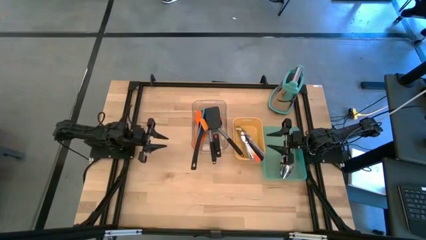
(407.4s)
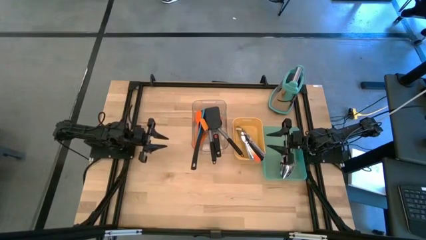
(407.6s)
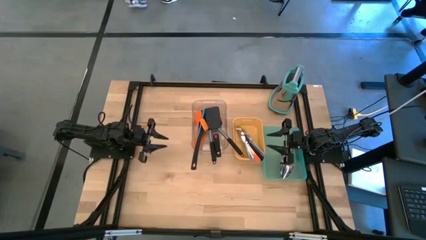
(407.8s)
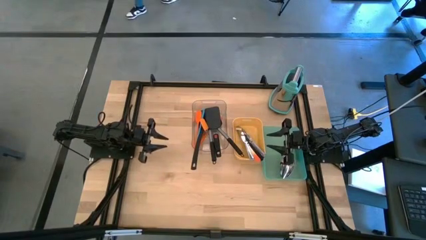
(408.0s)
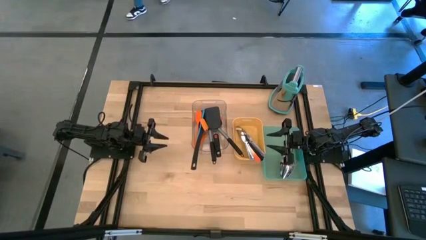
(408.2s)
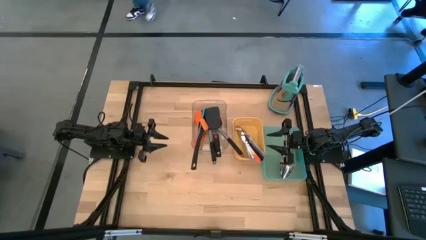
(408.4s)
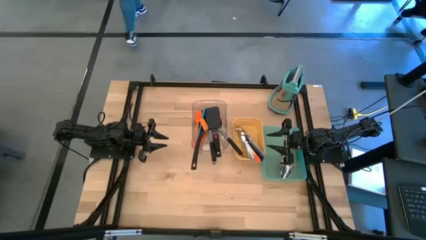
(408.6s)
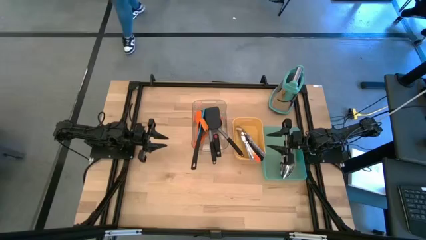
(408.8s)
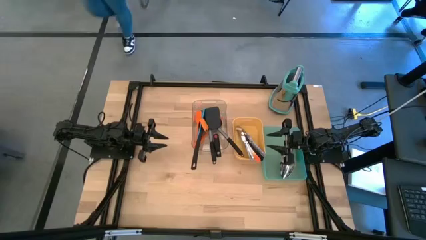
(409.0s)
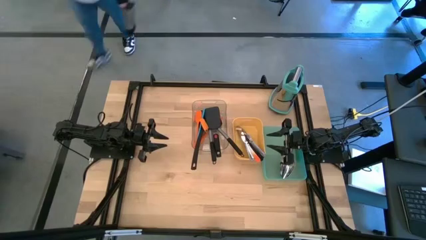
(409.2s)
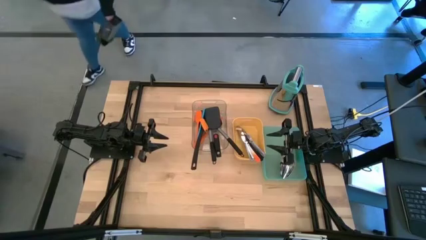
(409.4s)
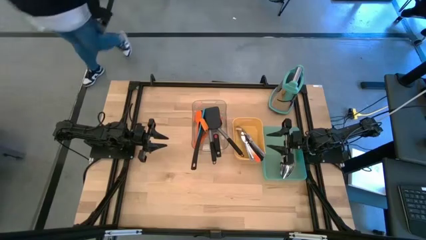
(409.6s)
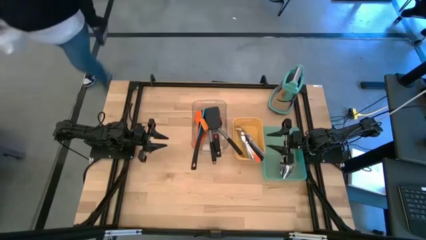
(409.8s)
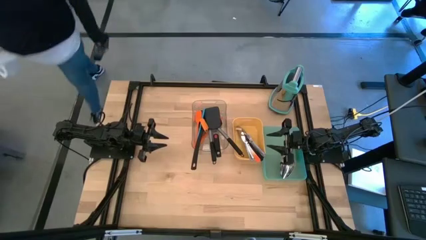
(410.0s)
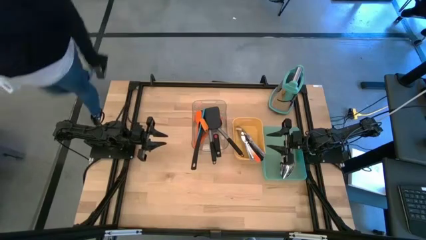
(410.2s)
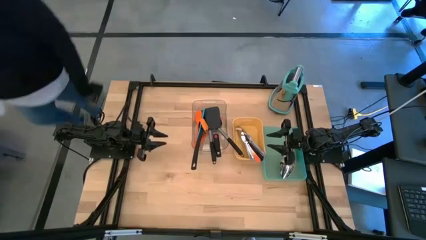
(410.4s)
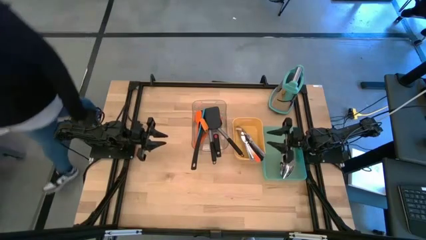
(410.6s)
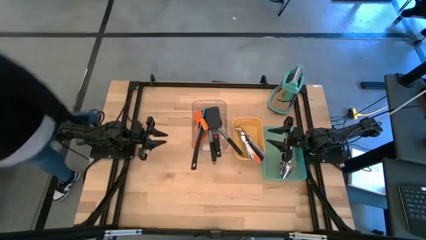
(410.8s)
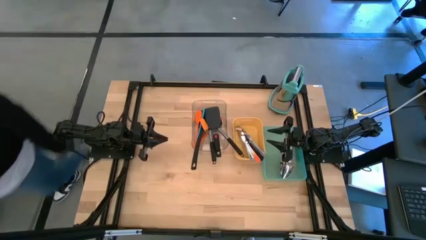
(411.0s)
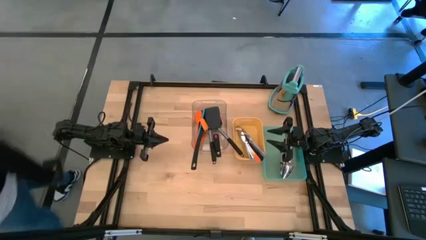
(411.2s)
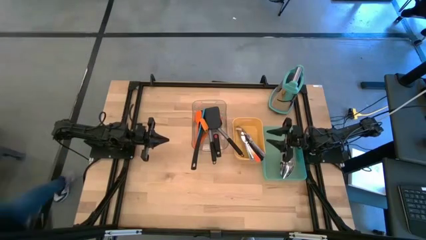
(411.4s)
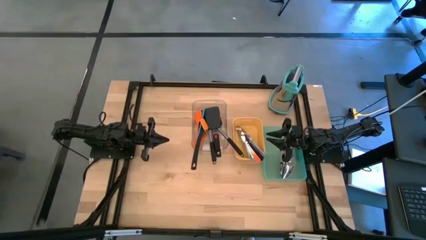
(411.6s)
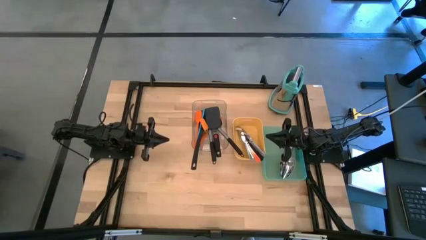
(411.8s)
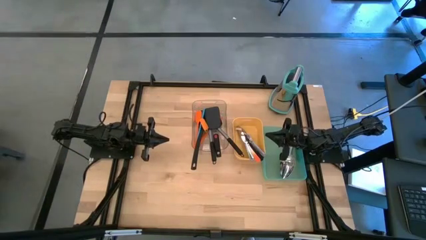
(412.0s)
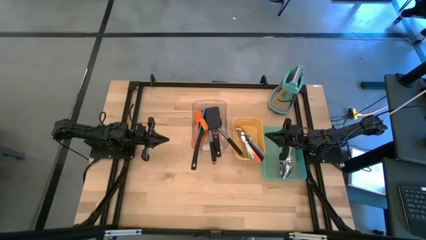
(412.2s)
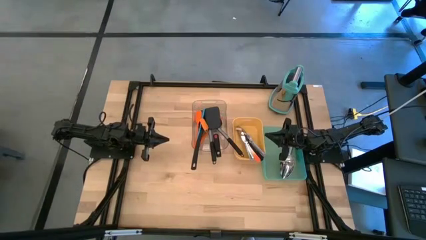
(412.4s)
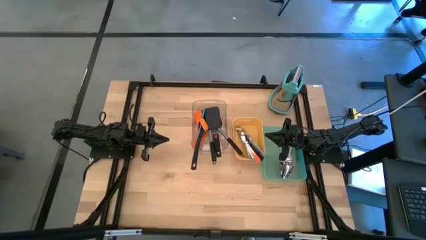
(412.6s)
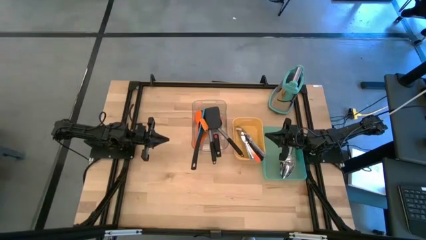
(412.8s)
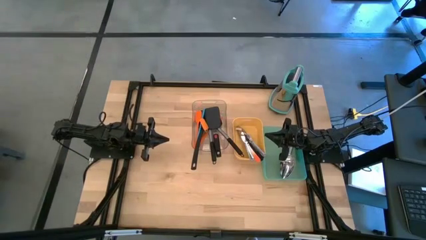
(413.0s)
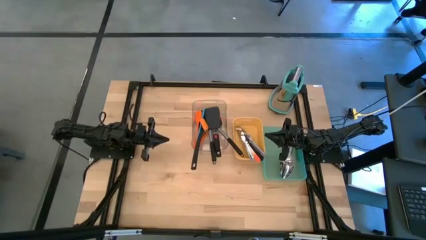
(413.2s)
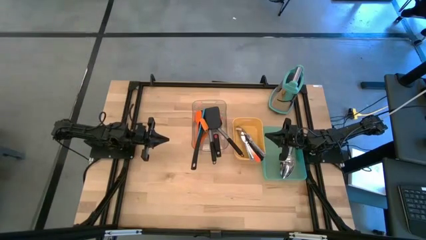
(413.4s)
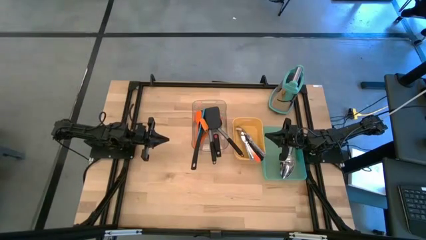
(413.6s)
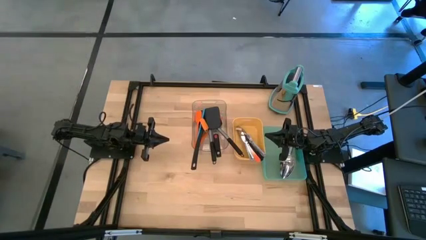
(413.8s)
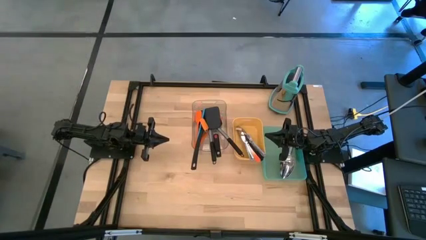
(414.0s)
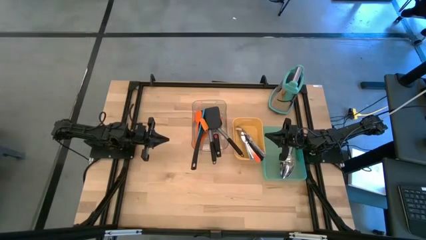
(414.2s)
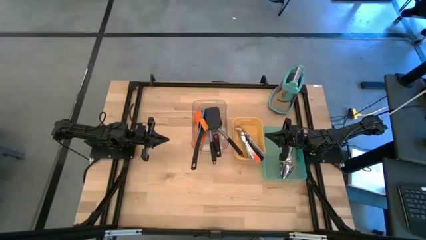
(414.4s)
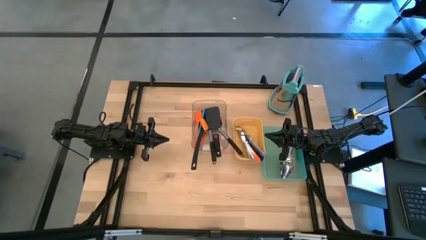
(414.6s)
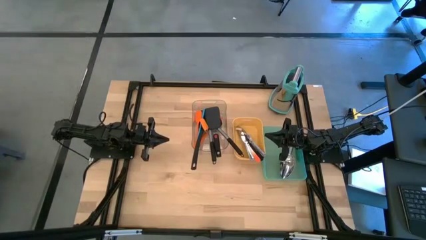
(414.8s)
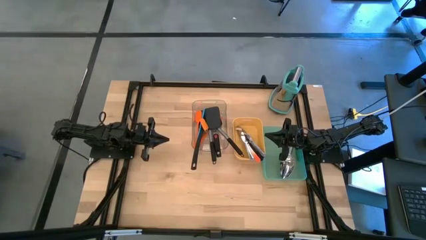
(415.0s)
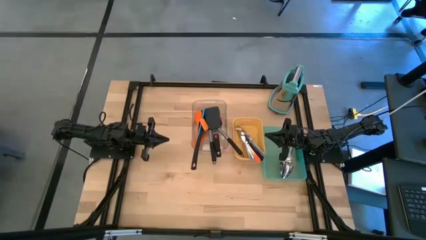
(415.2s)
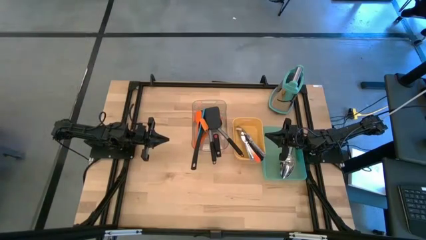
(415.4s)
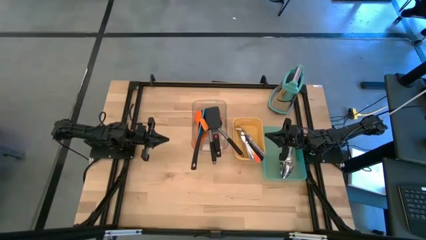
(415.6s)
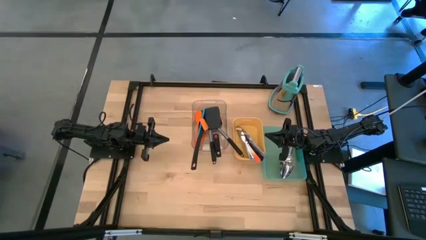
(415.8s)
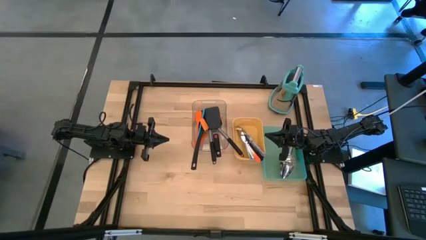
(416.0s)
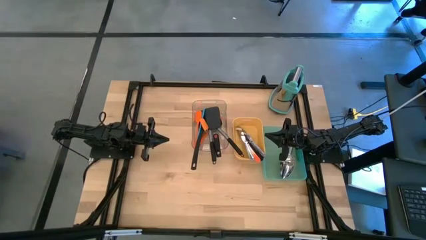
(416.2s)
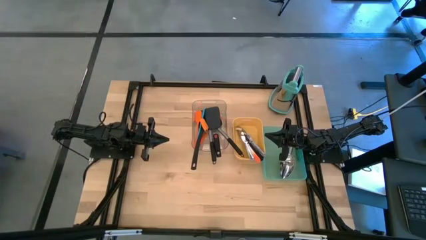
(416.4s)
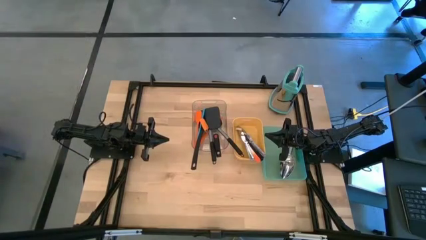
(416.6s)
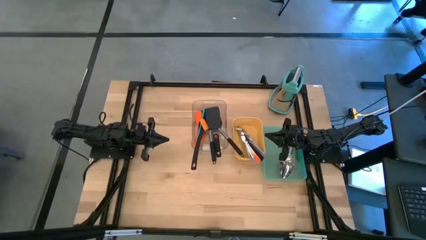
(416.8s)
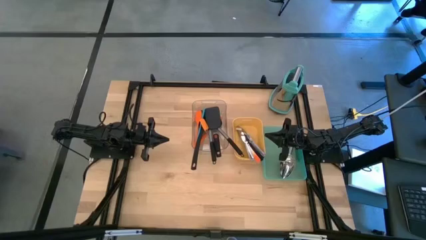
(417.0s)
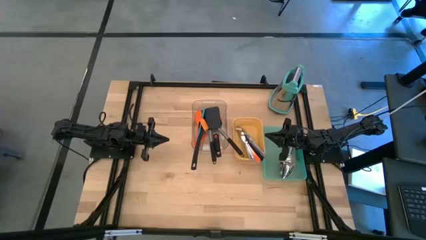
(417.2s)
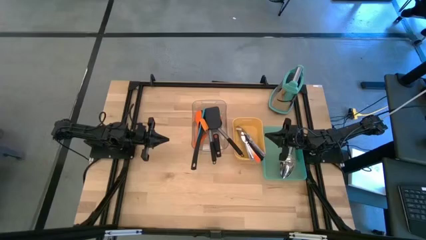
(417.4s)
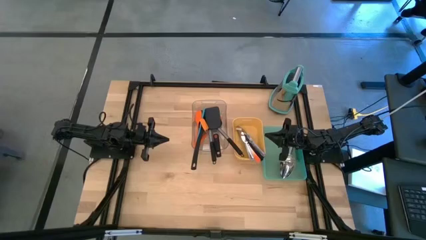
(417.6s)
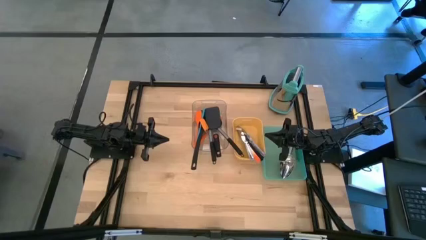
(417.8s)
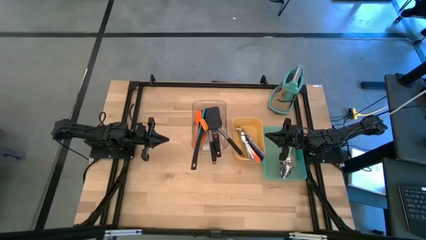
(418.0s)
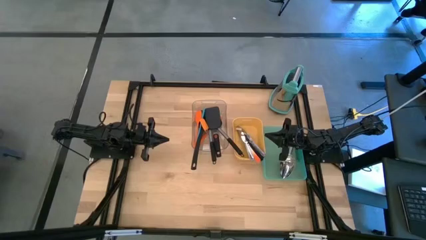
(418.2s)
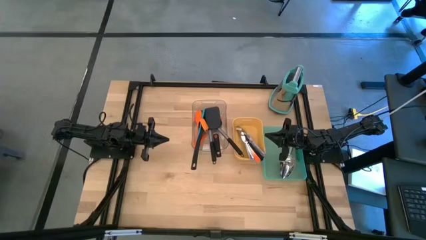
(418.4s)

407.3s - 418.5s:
Task: Pick & Place Kitchen Items
Return to Home Position
